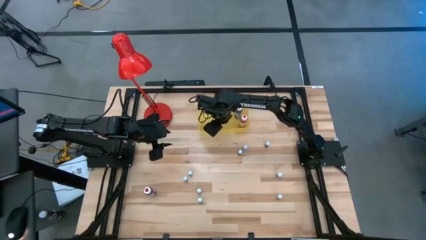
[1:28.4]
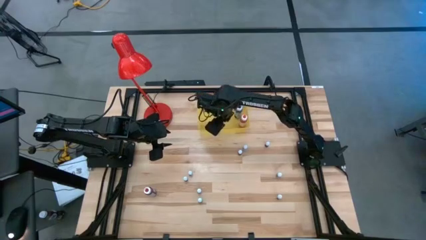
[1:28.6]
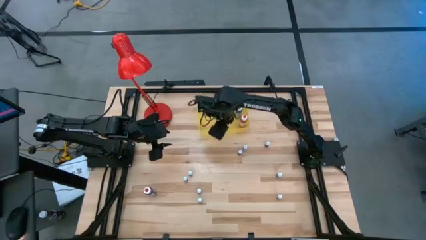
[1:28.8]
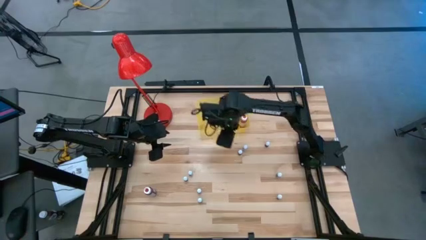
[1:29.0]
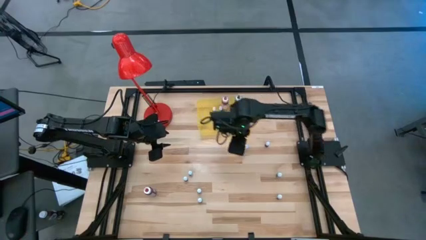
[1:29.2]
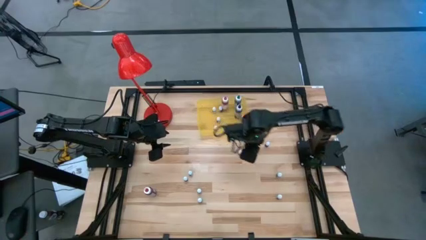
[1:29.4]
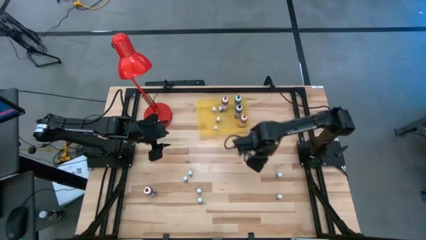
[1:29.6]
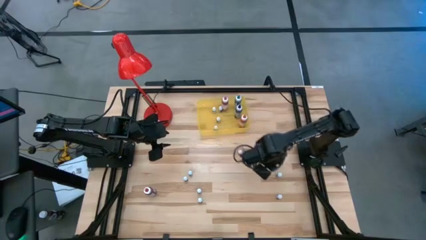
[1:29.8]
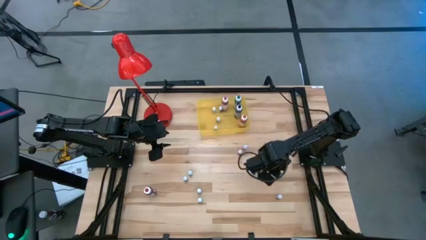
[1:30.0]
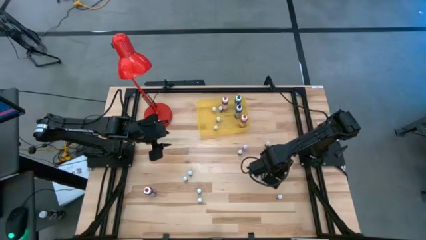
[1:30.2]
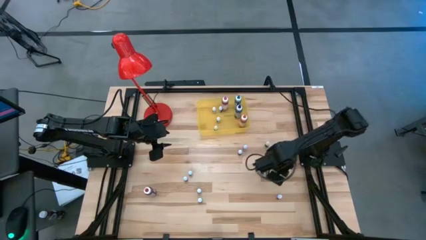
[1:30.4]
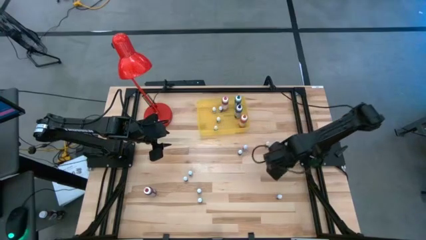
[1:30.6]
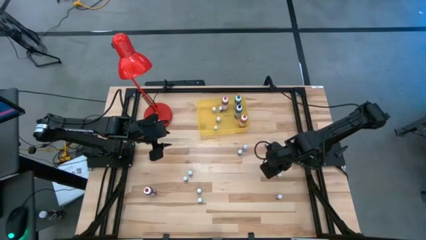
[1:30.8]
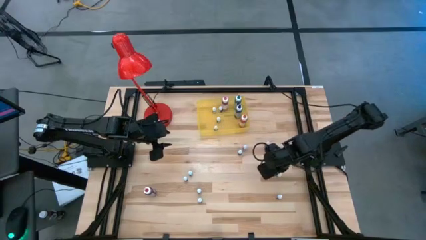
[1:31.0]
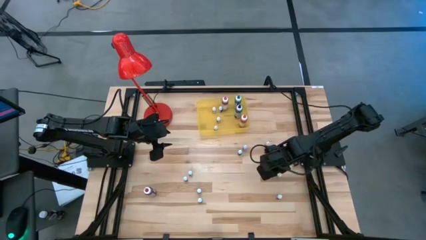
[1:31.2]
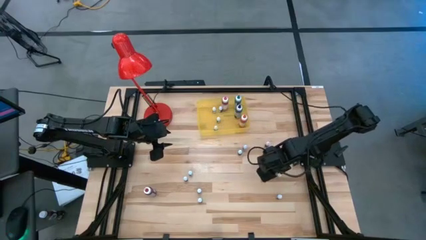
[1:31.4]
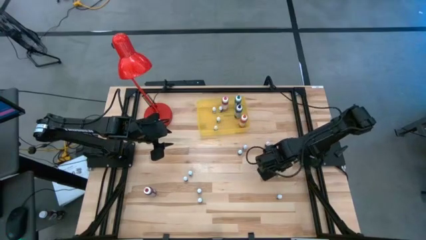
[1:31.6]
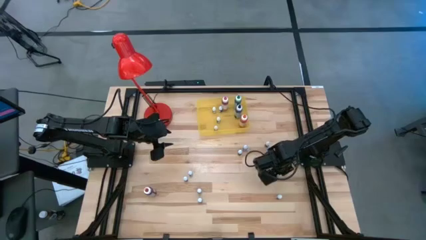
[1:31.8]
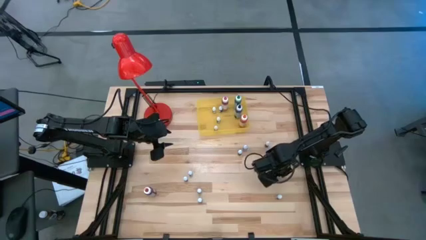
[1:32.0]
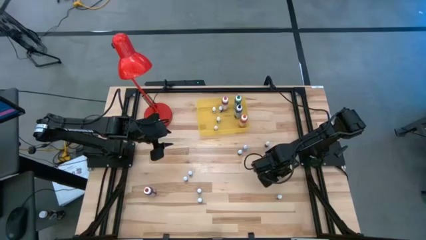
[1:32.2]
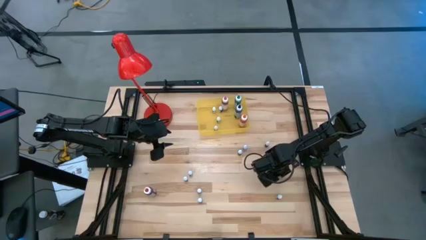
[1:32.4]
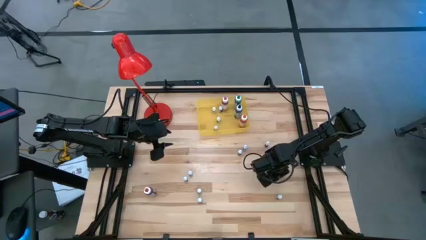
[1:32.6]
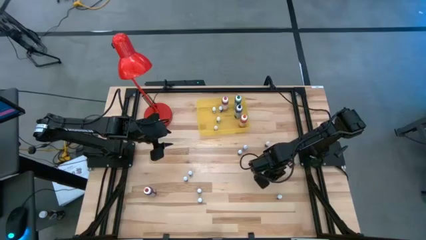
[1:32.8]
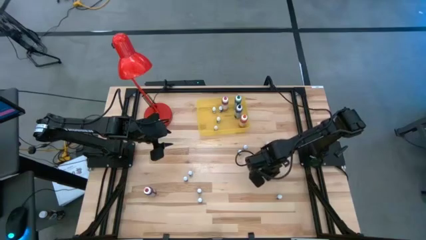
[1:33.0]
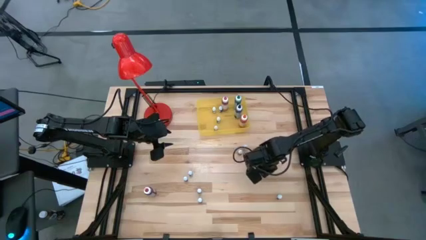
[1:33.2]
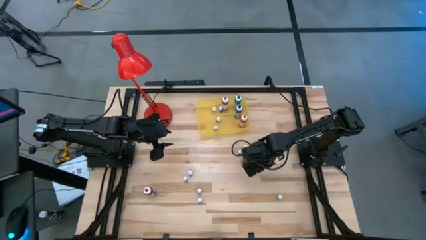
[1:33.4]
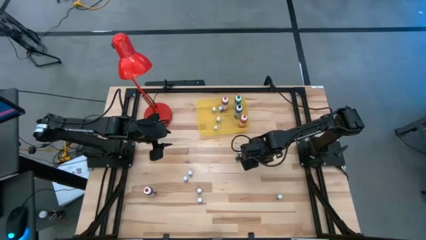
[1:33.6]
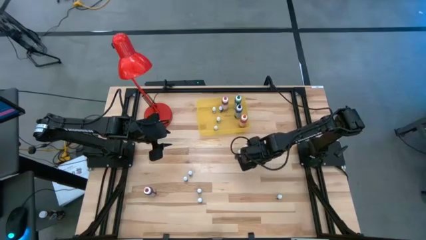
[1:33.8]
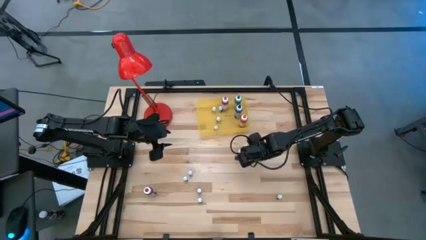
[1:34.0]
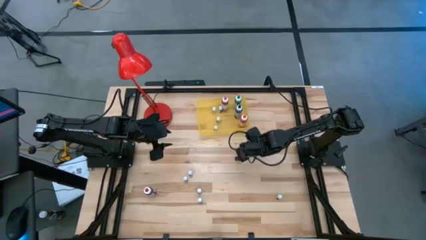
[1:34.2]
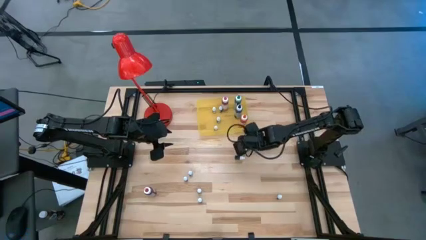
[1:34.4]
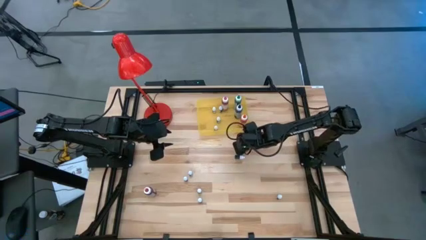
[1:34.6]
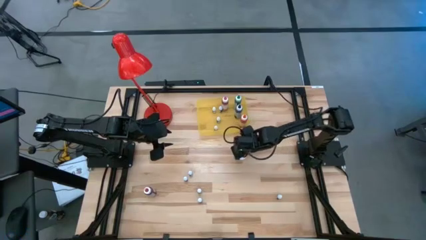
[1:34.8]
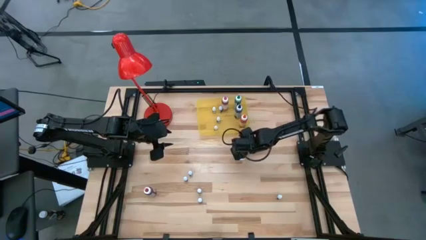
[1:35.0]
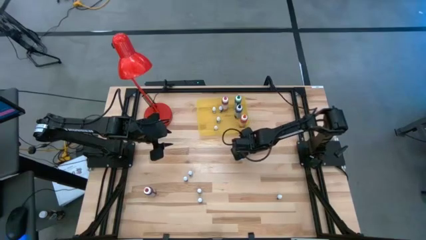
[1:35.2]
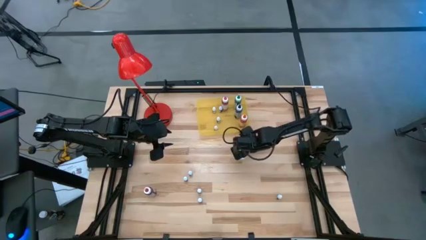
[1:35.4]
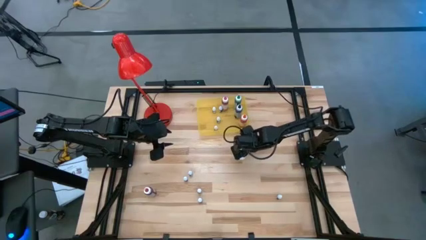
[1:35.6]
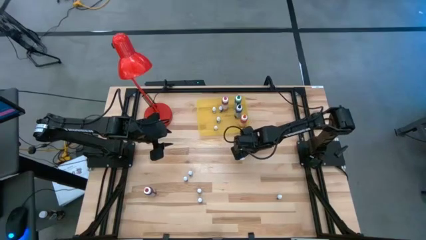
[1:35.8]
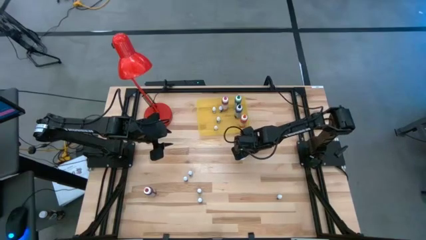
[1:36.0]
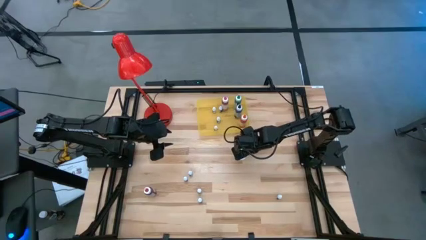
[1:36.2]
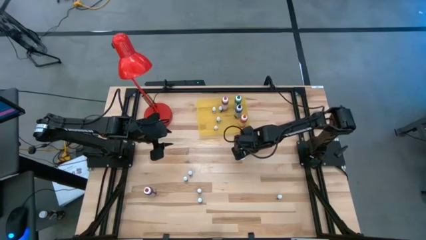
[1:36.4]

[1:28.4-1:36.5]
Task: Pick & Place food coloring
Put the small green food coloring bottle into the yellow bin

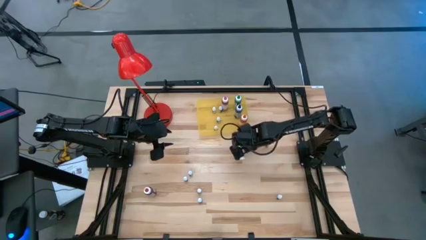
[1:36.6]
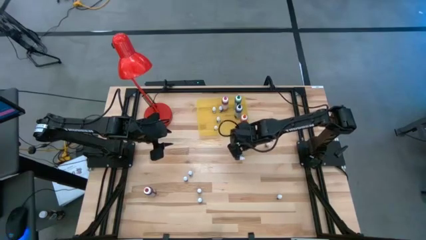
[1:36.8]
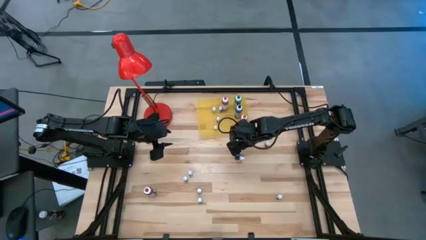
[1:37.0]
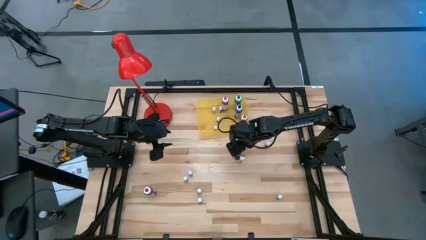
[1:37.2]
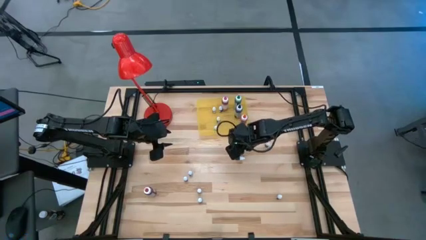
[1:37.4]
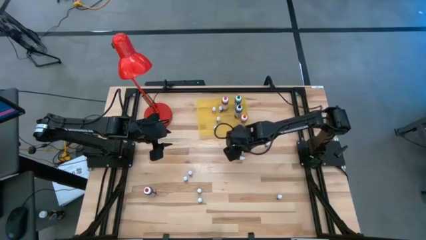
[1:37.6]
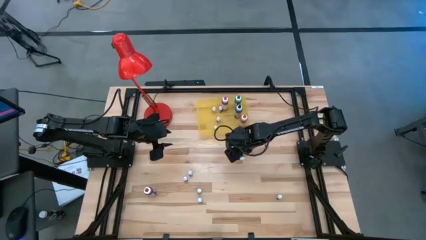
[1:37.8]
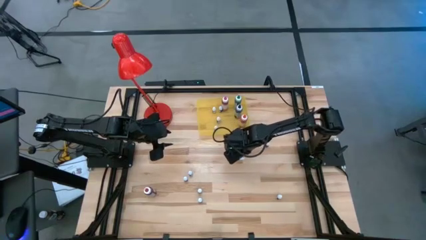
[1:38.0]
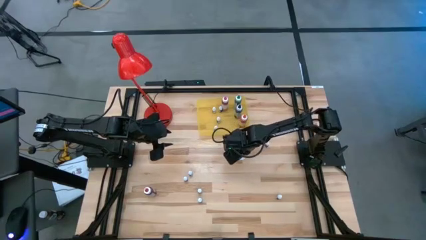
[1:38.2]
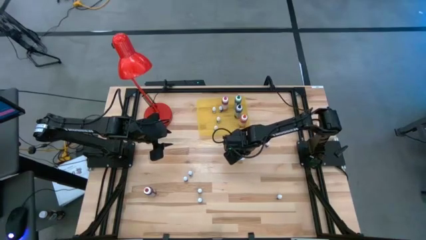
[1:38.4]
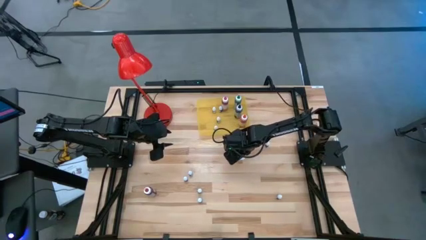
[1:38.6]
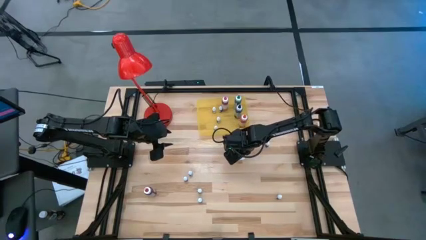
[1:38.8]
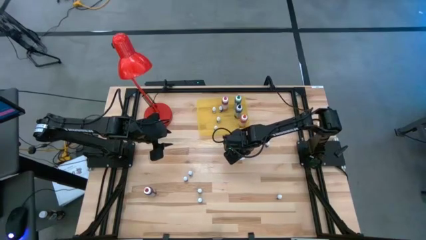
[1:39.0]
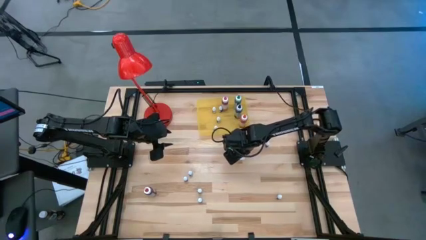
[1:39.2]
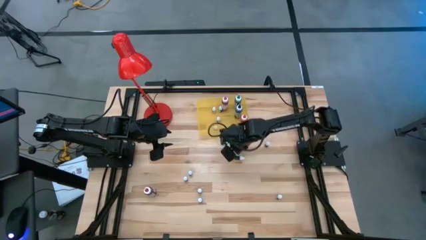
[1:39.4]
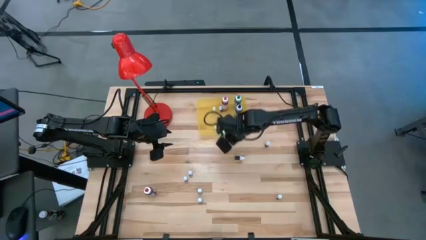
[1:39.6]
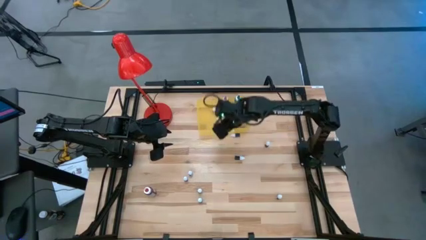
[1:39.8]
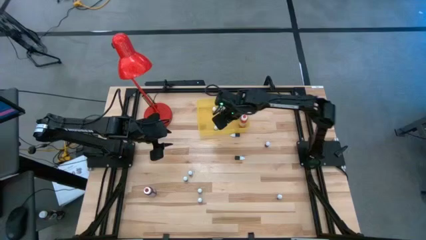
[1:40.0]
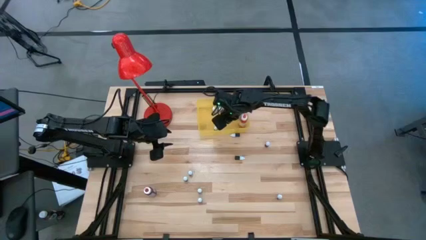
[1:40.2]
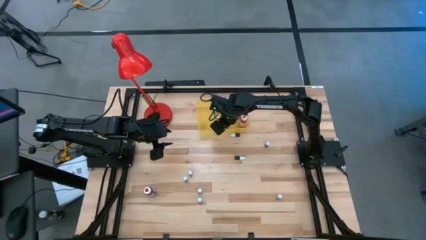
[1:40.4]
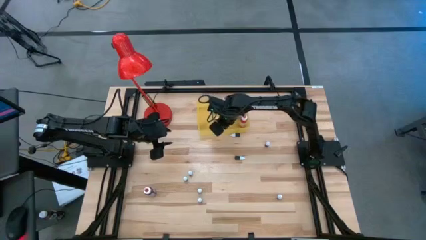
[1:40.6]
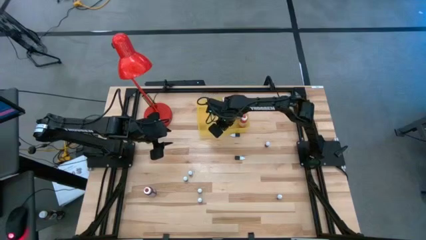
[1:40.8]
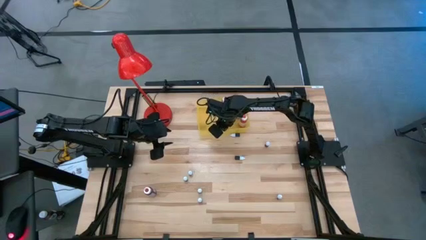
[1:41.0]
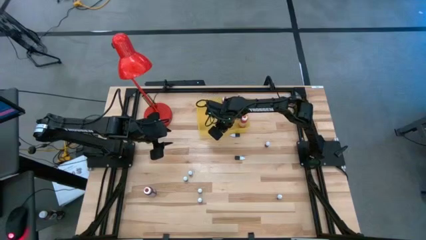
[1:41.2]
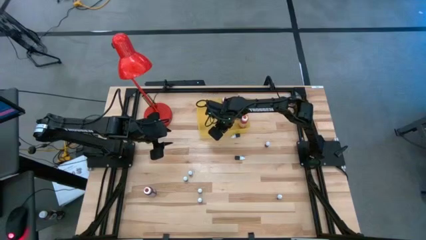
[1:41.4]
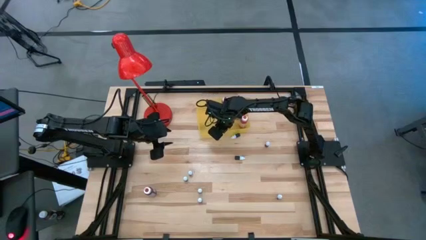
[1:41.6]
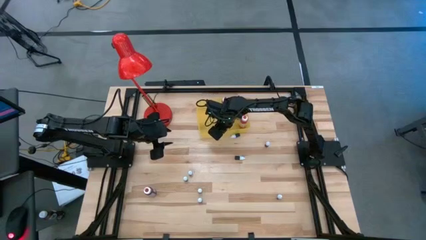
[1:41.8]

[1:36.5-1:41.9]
Put the small black food coloring bottle into the yellow bin
